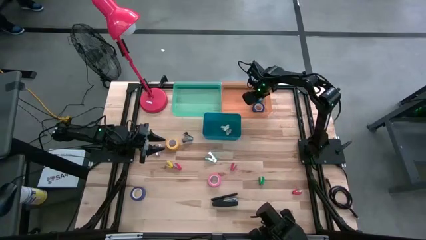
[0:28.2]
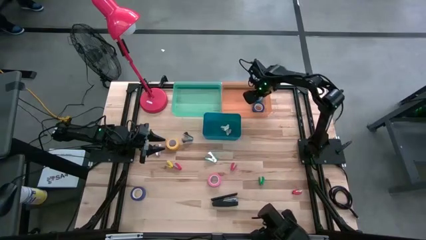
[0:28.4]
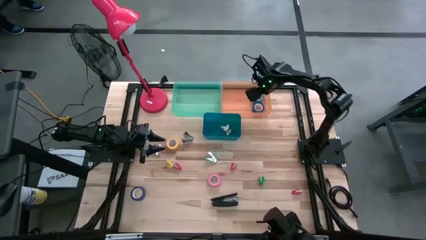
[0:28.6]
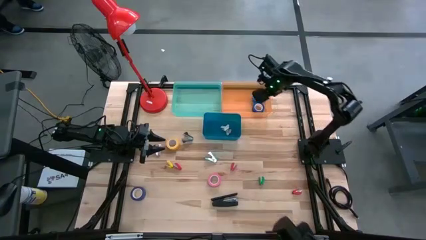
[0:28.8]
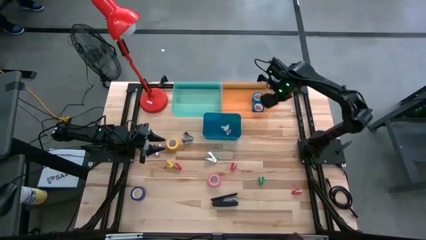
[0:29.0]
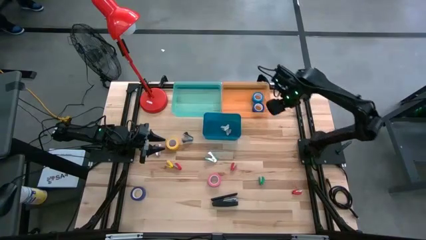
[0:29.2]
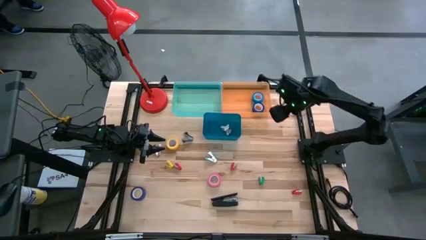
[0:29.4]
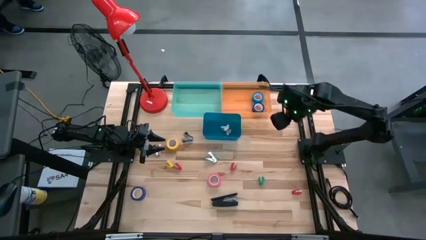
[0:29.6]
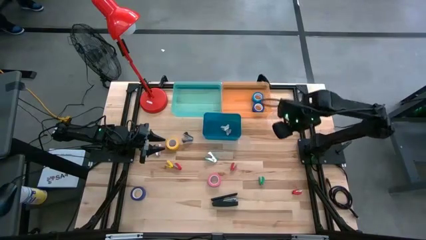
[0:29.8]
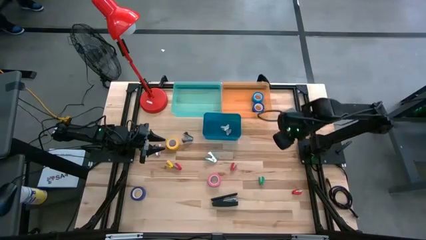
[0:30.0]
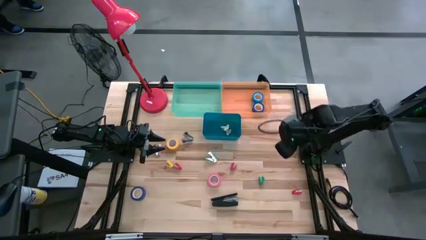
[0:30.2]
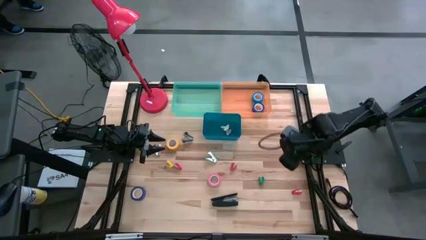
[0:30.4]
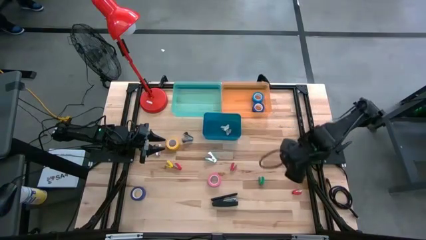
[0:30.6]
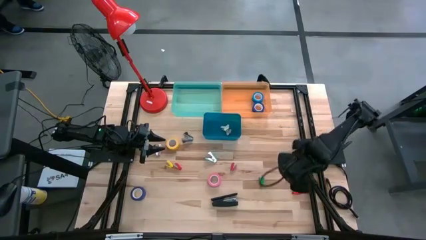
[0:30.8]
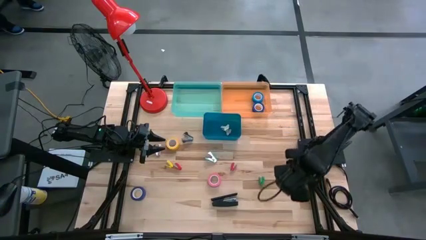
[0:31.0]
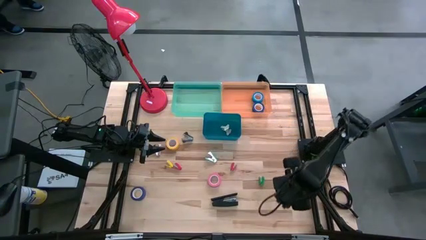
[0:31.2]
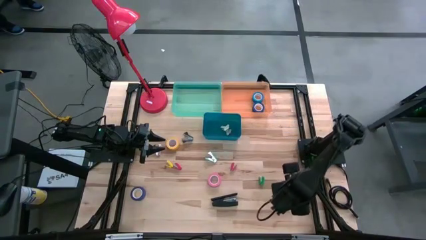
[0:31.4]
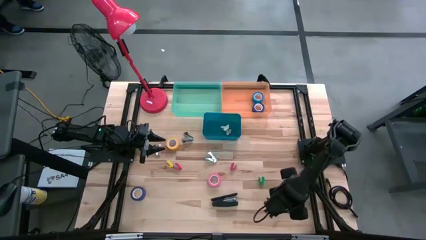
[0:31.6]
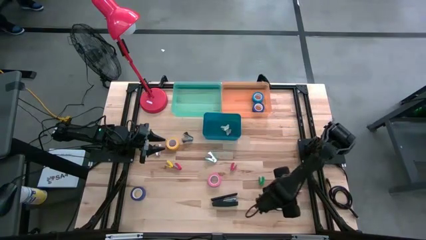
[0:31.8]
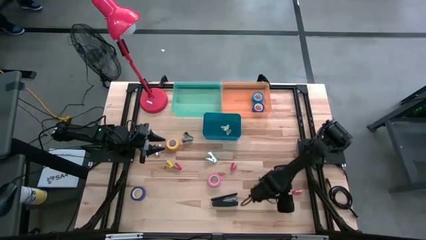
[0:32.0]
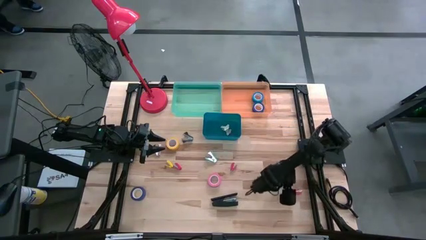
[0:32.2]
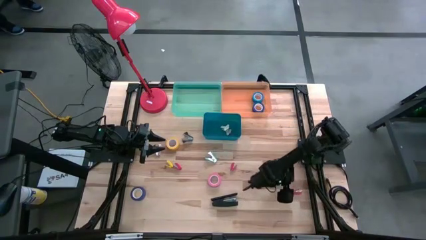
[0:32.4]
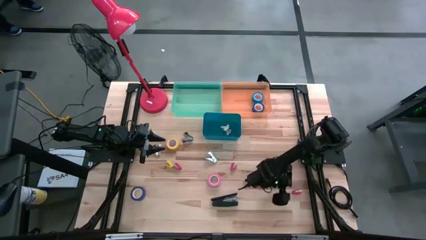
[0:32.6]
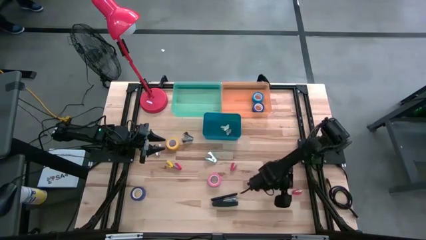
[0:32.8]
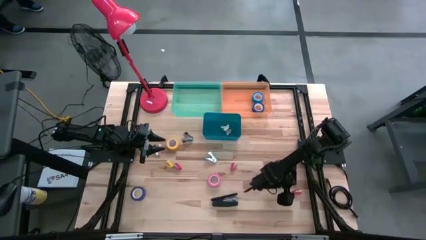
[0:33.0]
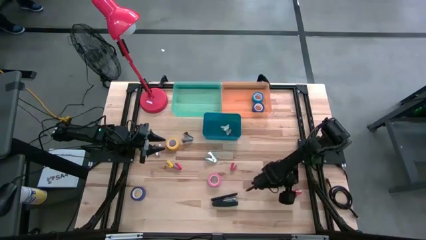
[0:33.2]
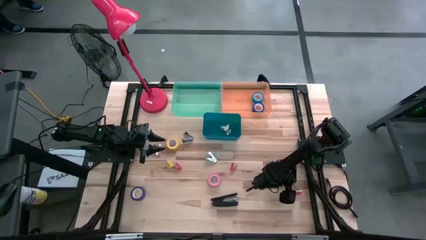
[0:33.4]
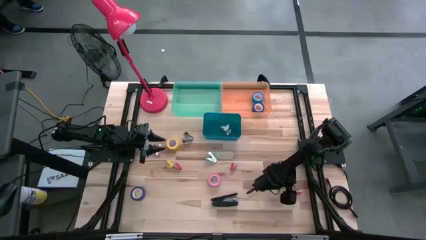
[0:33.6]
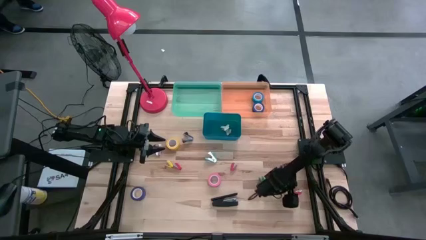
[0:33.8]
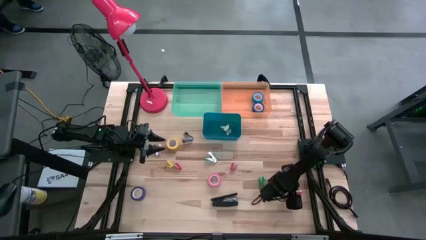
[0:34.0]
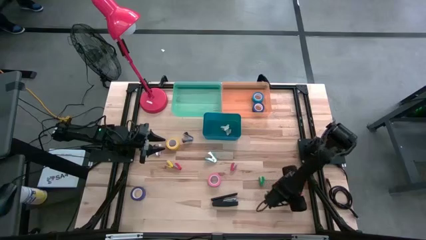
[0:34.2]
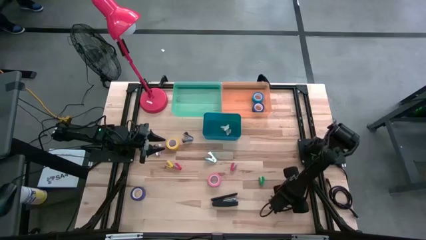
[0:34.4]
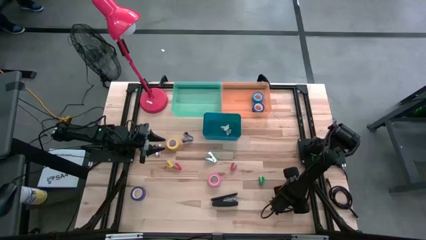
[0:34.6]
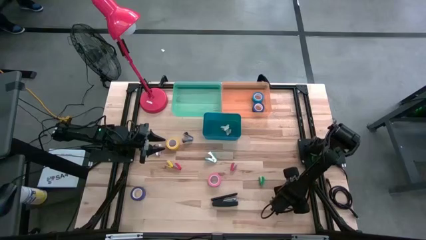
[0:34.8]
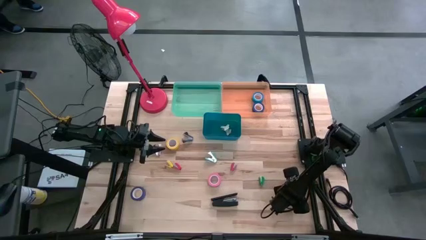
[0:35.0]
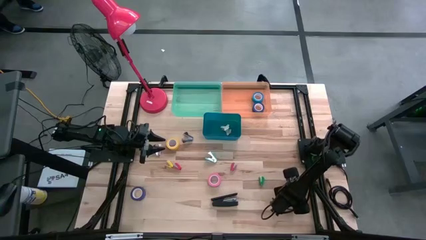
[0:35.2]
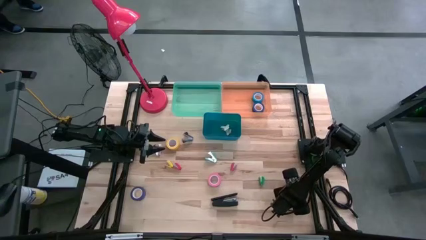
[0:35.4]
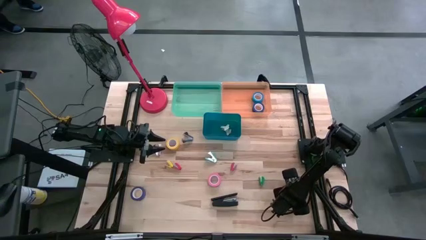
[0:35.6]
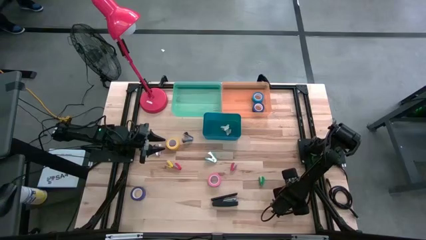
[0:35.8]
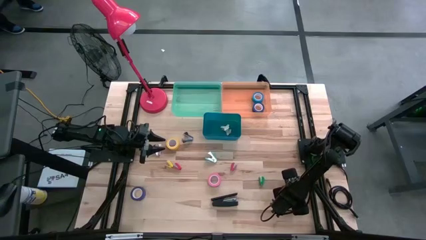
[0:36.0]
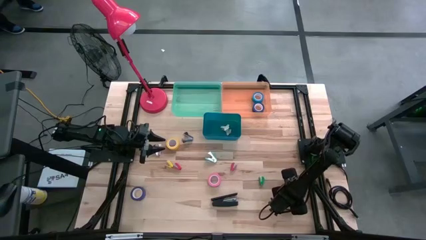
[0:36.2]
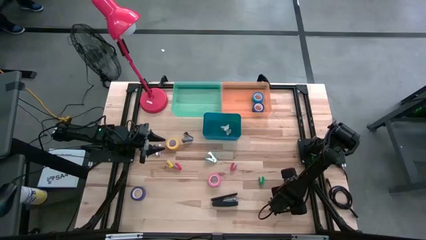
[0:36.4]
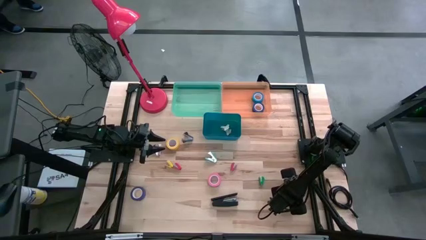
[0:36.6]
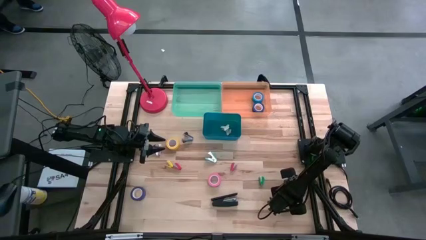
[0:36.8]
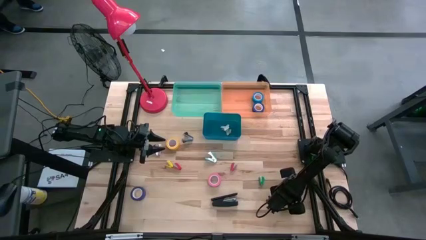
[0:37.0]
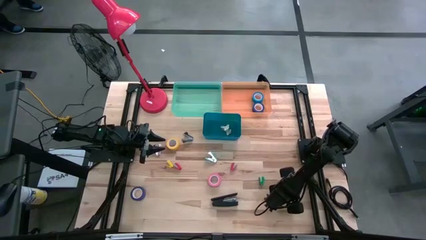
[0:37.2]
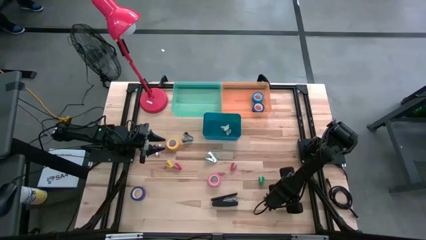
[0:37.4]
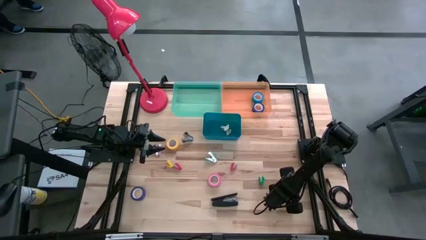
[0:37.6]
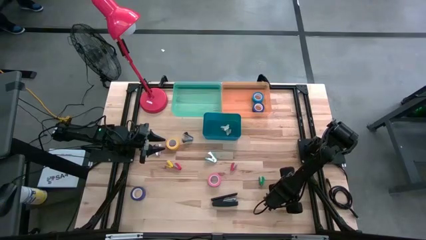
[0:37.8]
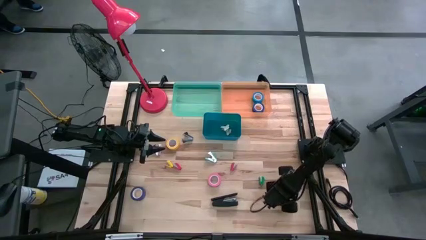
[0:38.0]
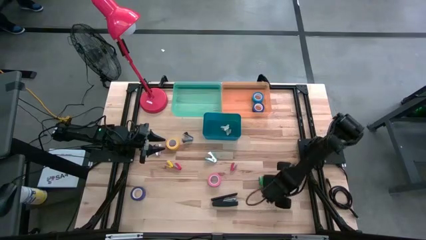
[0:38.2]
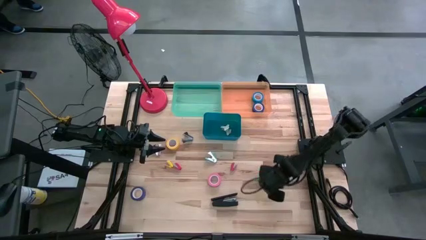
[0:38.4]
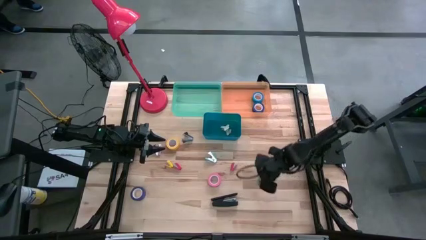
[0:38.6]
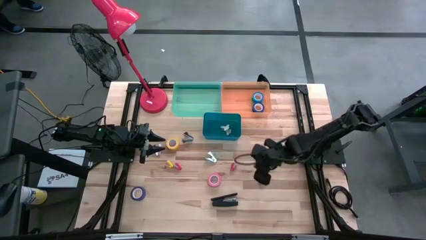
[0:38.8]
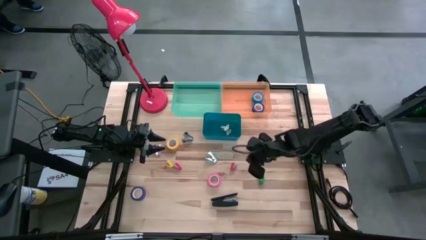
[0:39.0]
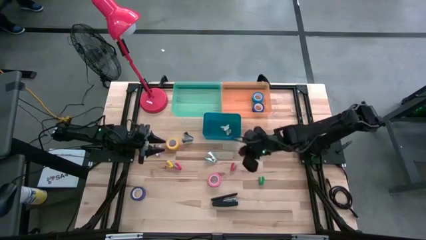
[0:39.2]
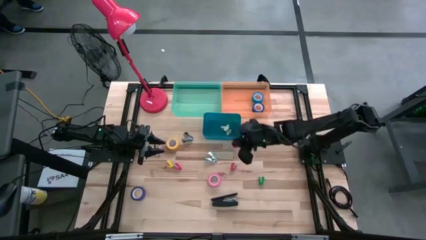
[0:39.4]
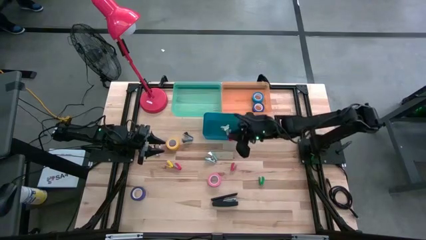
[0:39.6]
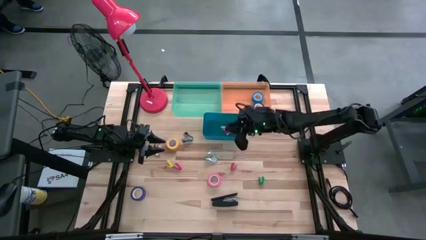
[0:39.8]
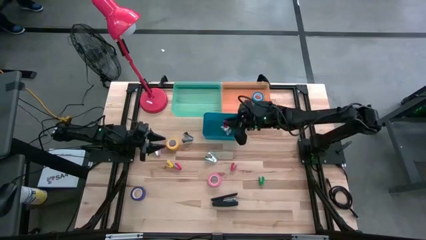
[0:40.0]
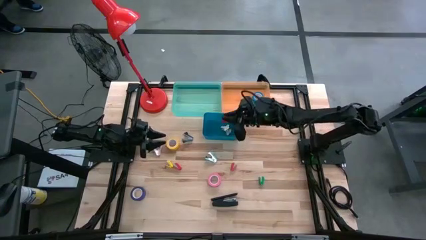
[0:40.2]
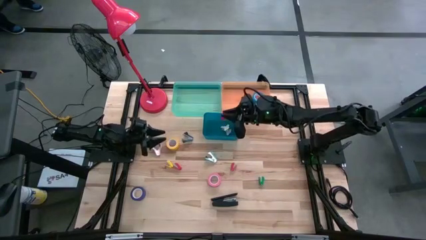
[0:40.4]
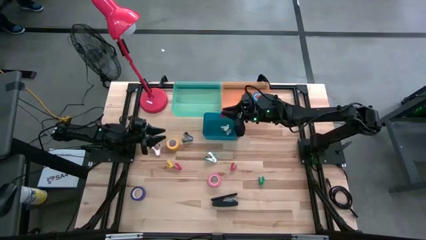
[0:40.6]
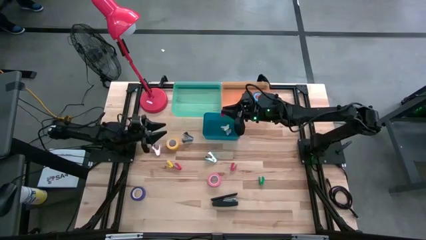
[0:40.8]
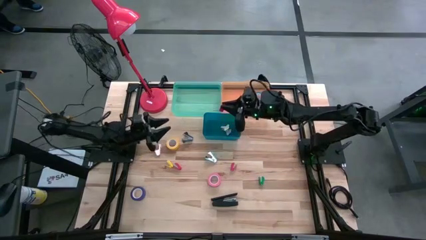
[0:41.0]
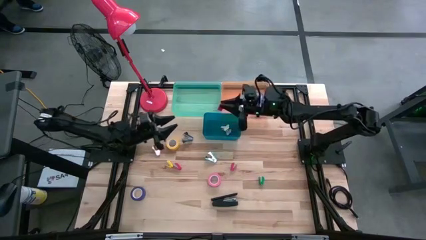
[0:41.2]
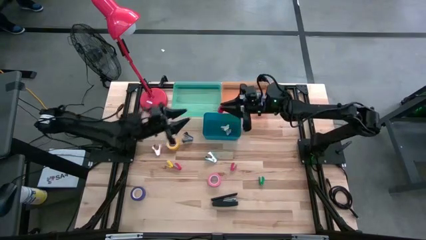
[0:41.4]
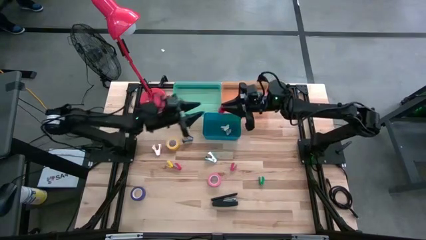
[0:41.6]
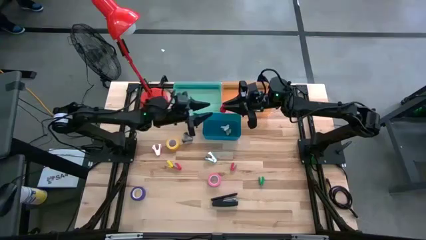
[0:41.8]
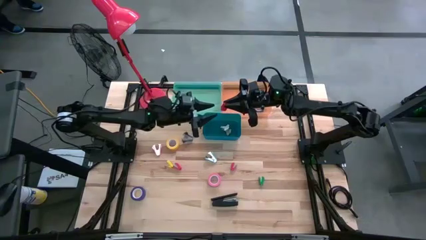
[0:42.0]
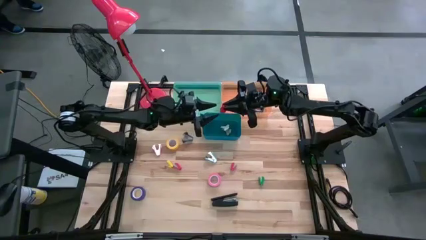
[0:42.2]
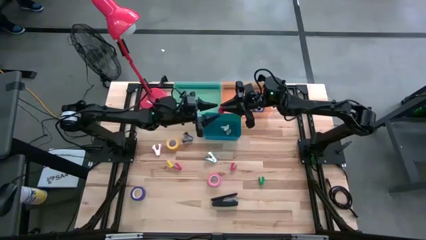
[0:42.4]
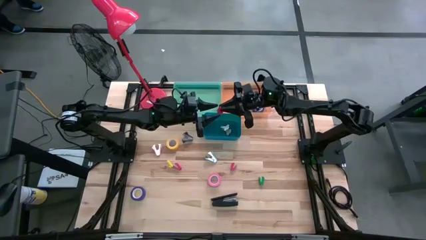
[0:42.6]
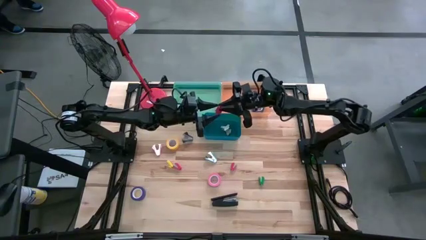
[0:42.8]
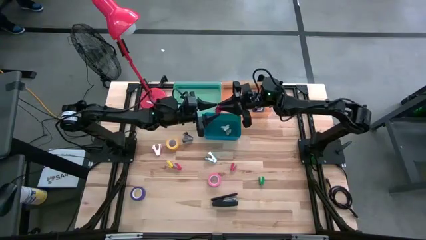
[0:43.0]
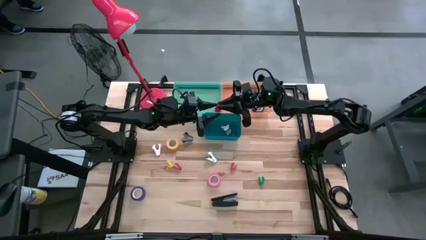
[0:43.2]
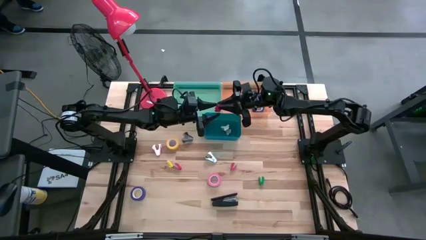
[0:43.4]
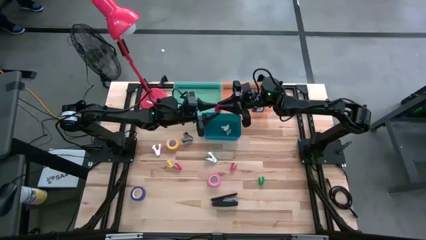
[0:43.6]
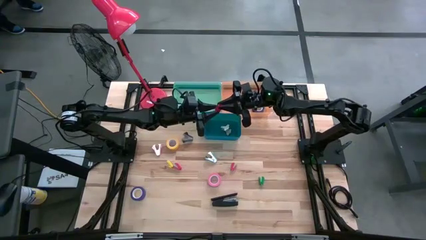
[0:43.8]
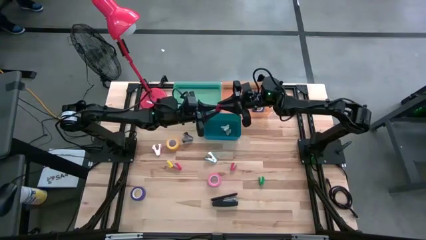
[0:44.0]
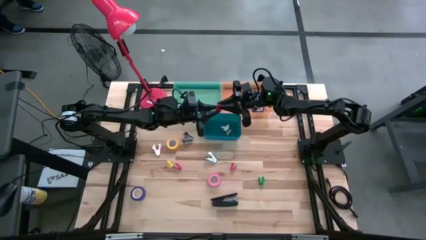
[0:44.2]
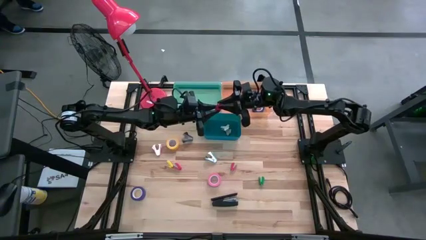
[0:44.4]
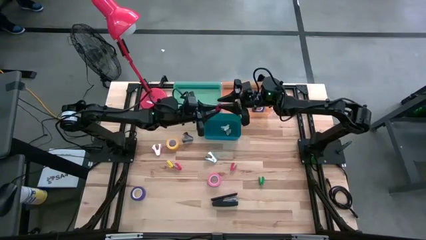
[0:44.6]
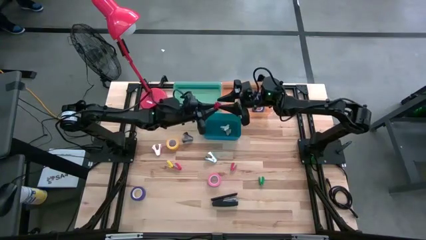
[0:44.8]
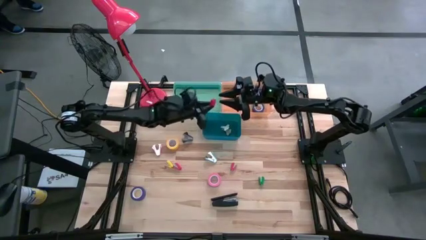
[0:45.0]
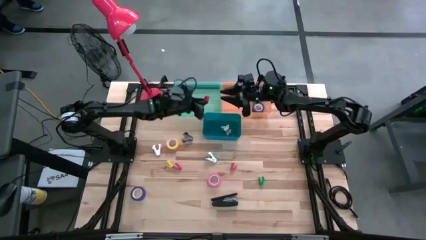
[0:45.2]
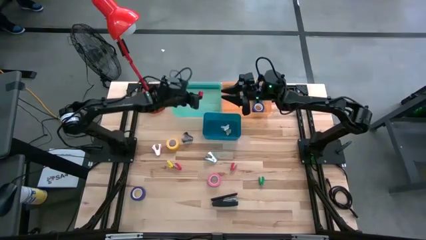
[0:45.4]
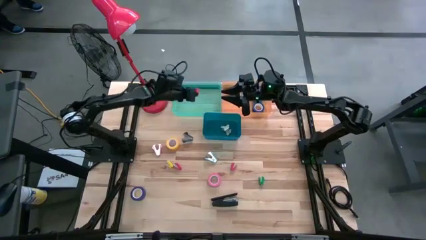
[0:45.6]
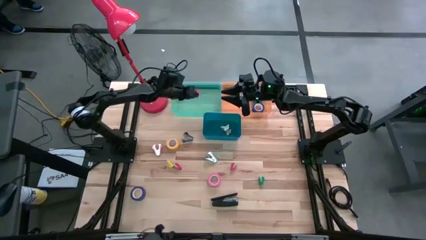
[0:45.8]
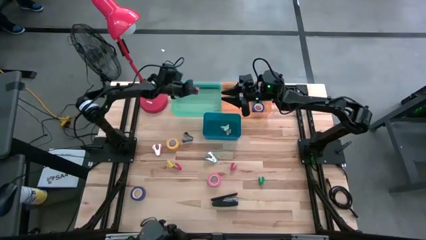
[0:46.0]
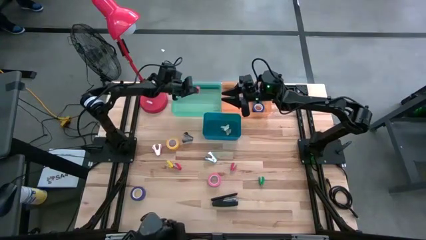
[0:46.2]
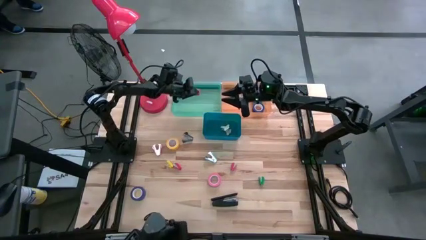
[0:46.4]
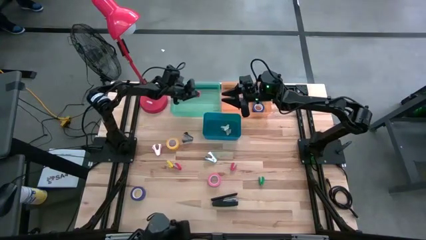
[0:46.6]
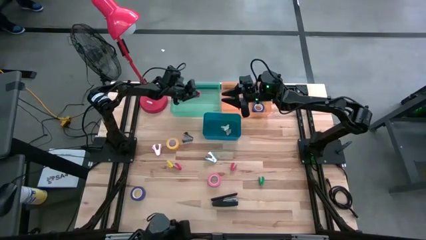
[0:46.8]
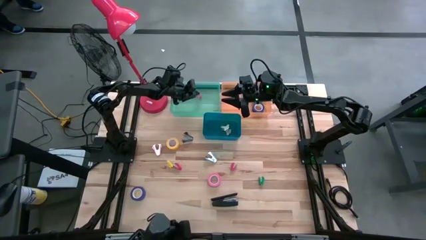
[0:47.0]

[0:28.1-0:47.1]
Task: Pick and place Stapler, Stapler remover, tape
Put the right red stapler into the green bin
